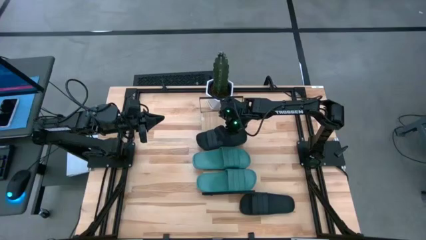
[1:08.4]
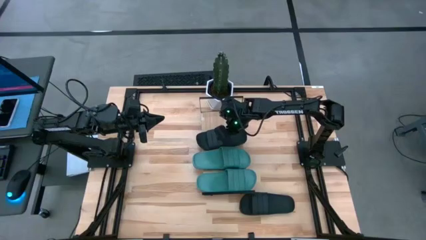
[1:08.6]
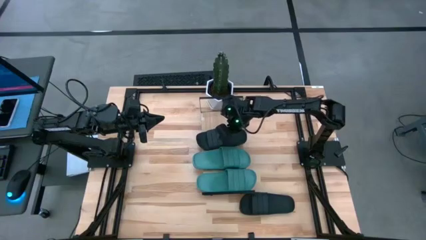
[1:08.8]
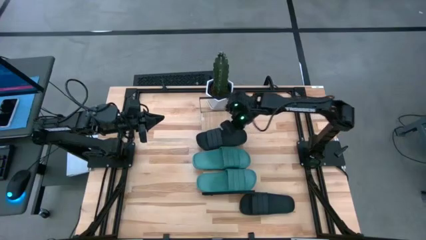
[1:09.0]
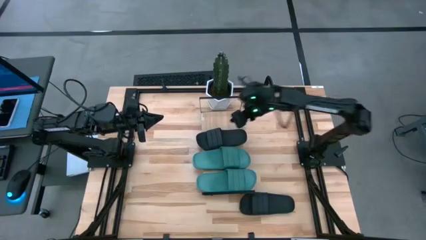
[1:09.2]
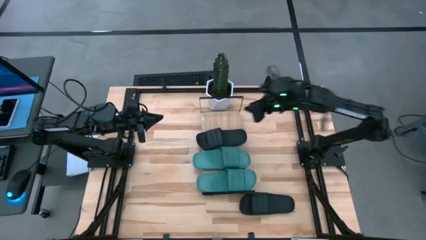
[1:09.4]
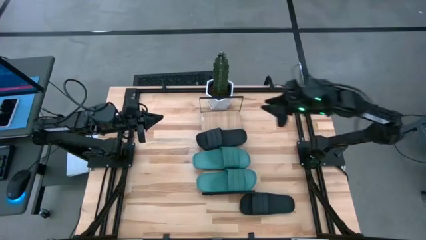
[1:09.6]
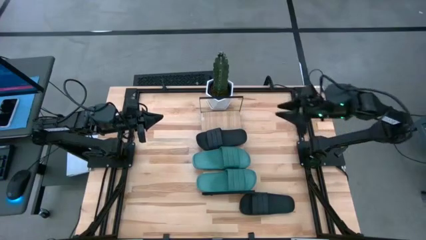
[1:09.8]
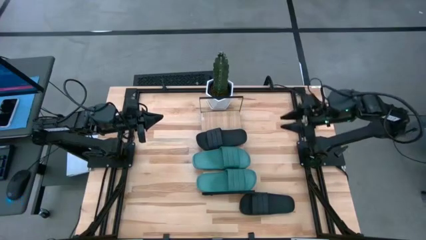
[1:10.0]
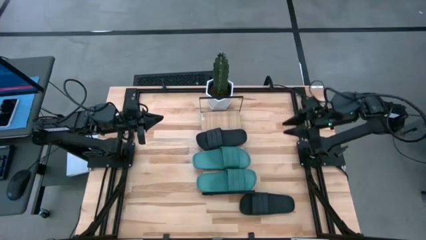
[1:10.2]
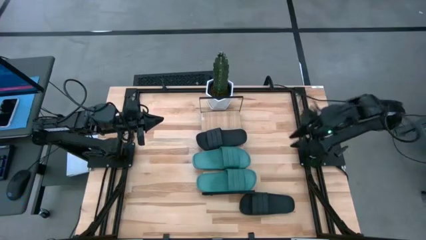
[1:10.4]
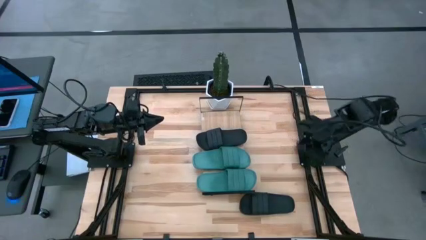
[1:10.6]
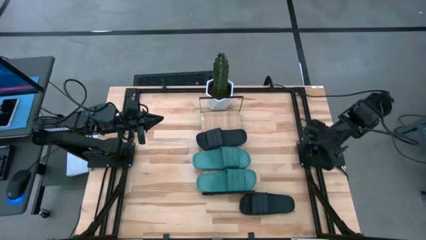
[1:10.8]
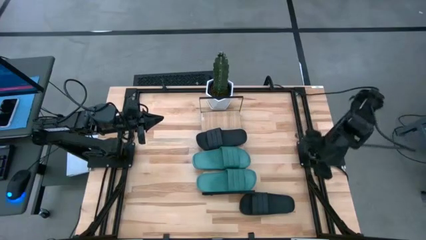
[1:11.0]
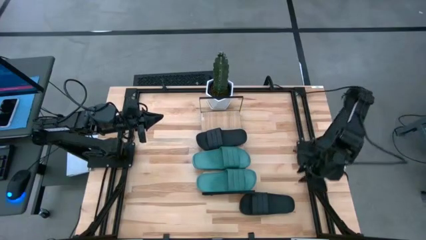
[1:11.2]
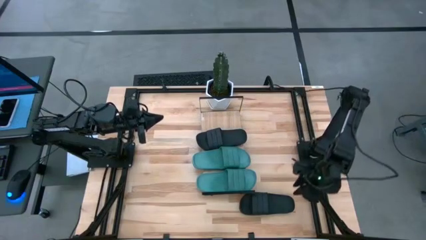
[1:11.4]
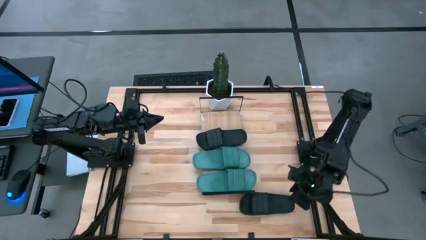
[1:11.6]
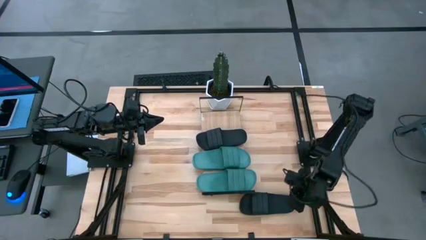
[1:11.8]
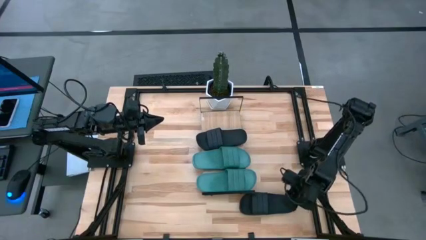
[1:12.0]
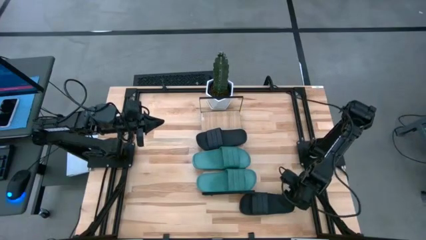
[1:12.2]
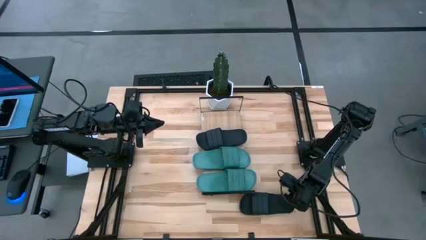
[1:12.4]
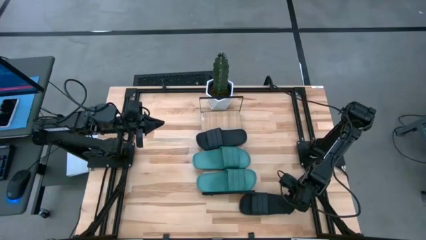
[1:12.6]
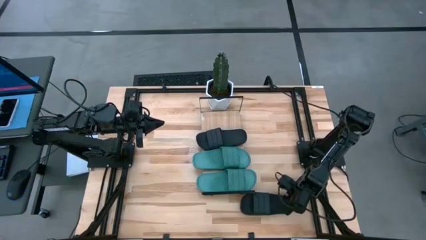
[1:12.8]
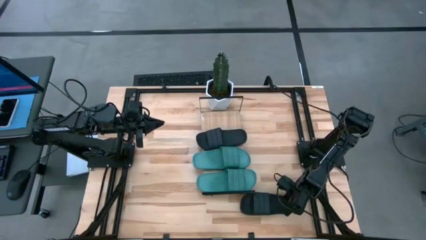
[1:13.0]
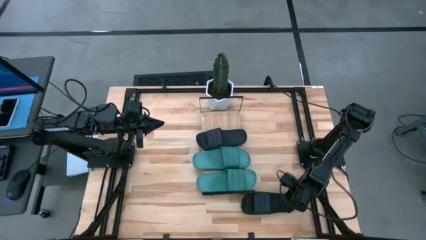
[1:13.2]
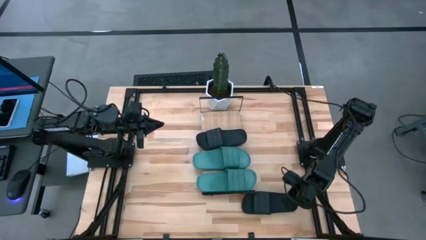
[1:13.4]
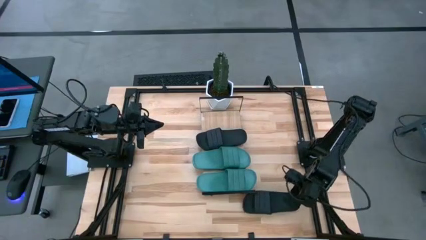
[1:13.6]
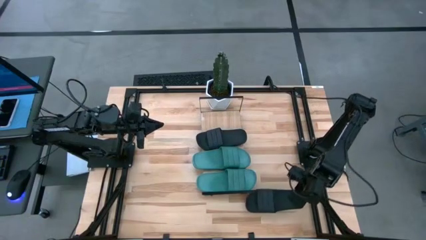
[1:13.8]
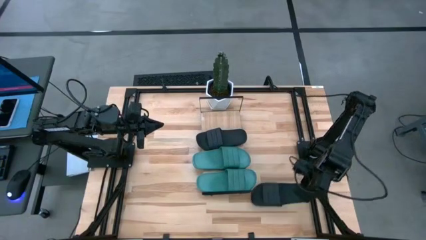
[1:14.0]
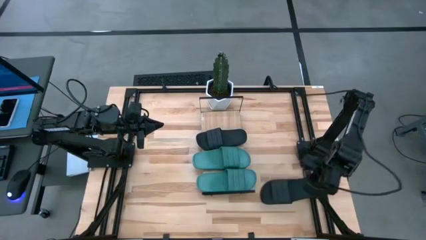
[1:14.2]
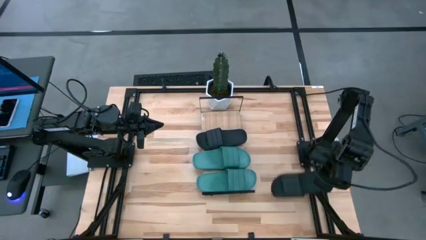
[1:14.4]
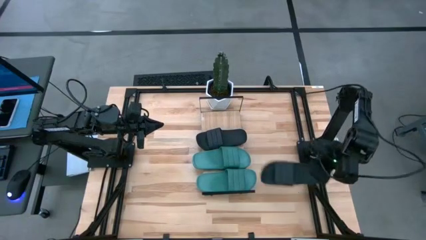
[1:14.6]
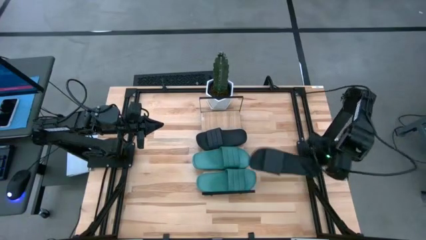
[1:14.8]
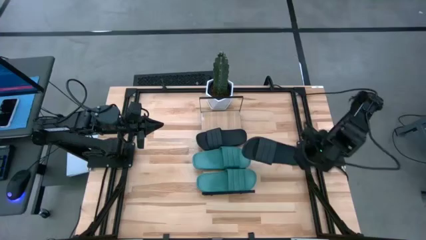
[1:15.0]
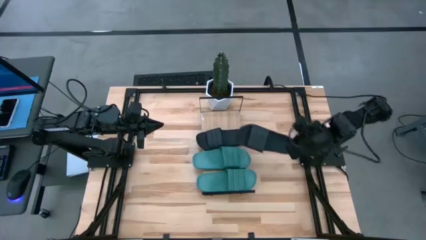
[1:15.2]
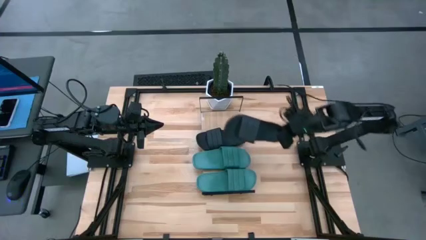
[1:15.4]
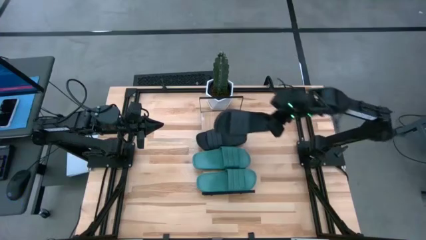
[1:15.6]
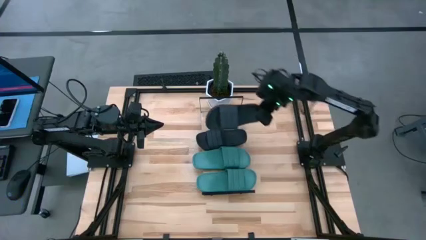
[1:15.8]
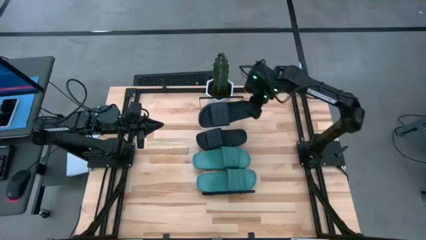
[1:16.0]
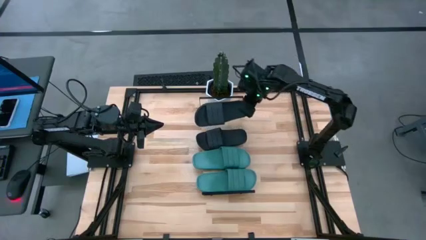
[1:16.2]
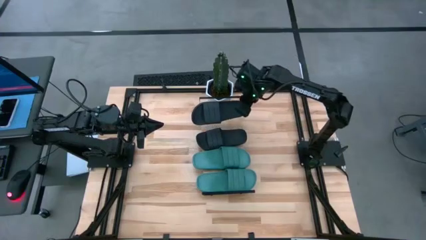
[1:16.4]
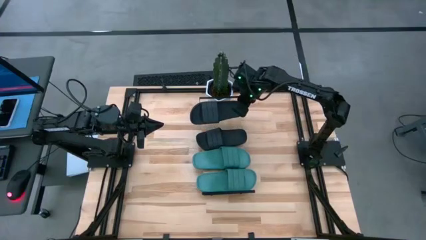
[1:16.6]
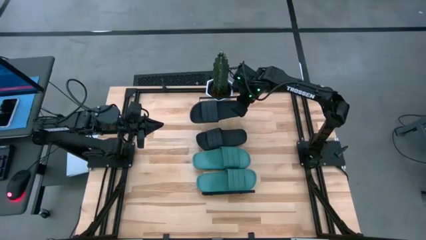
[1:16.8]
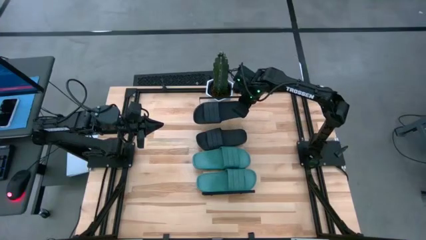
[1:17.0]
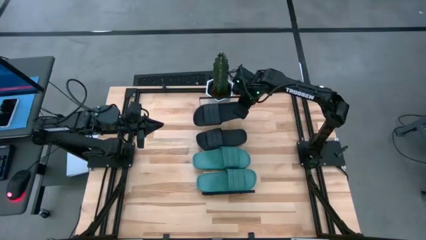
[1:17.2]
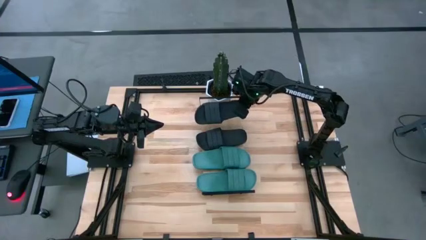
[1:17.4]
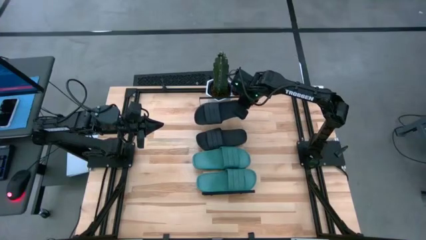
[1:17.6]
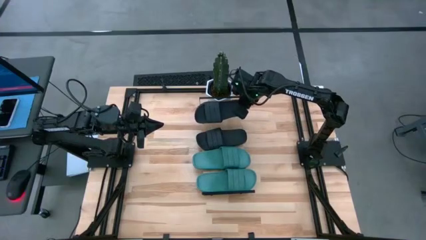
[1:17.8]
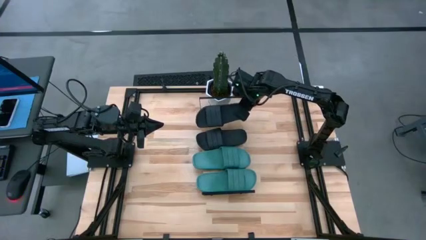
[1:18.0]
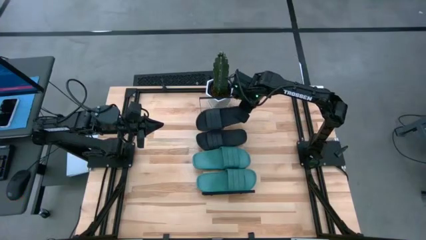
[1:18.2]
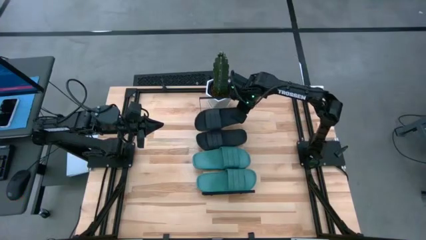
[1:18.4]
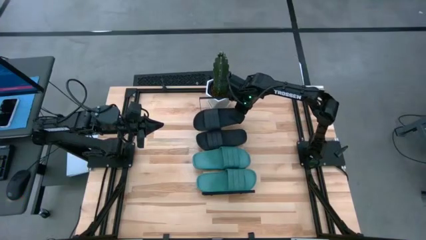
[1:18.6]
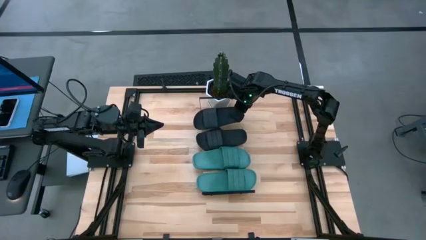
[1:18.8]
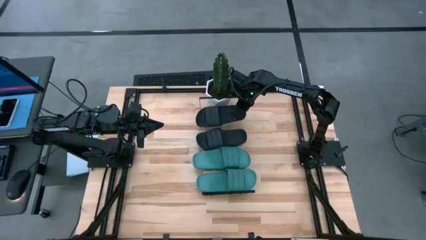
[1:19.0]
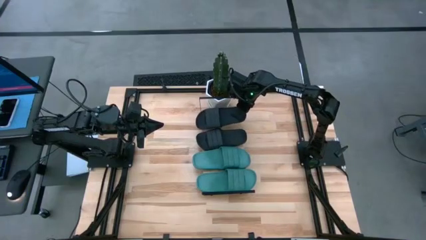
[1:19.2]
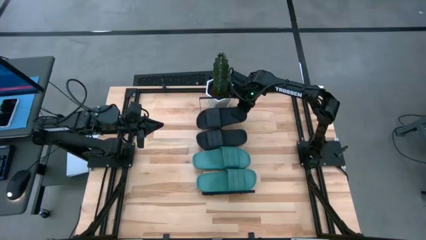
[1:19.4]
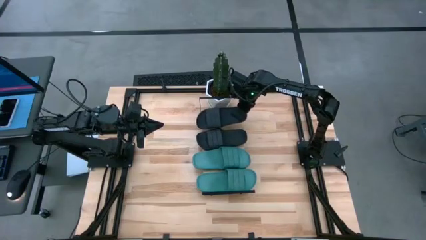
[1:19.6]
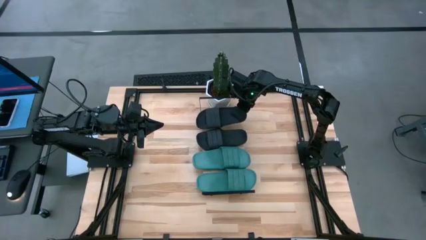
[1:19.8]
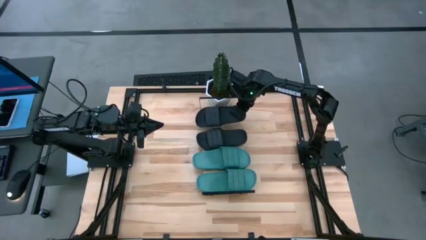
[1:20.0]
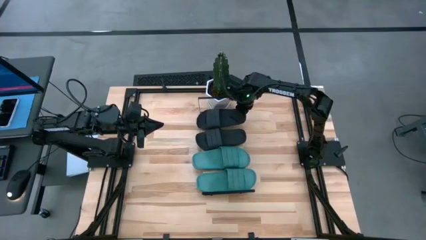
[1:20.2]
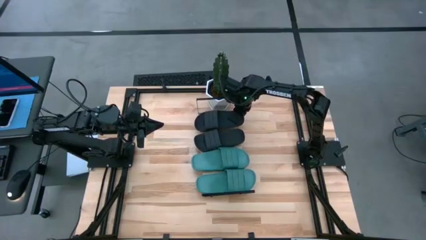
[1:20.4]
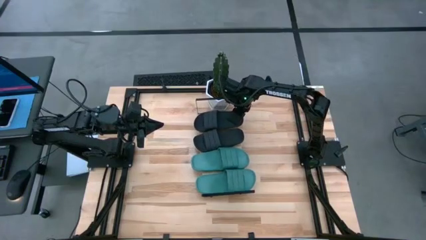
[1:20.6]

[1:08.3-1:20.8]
Task: Pick and place slides into the shelf
Put the black slipper on the shelf

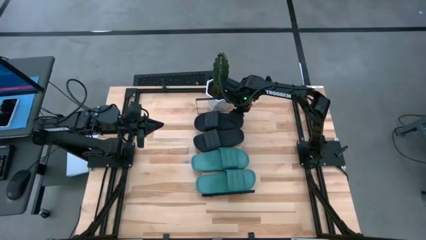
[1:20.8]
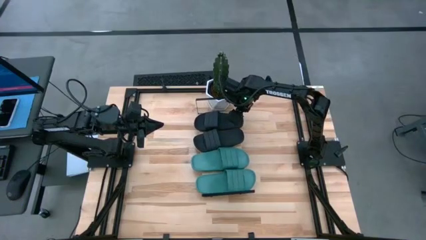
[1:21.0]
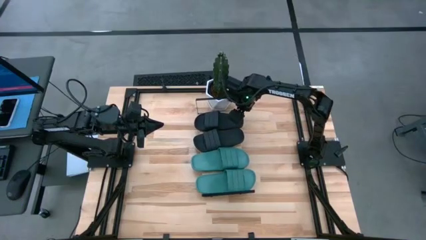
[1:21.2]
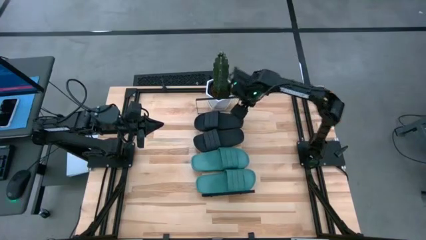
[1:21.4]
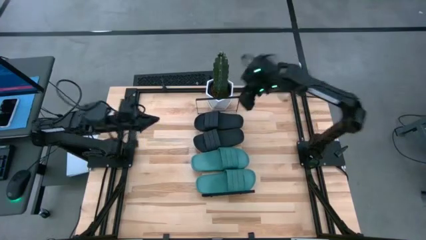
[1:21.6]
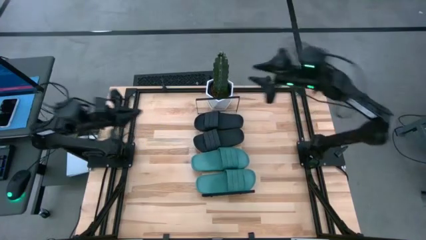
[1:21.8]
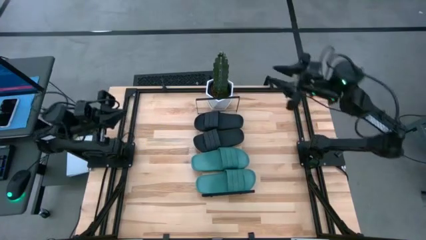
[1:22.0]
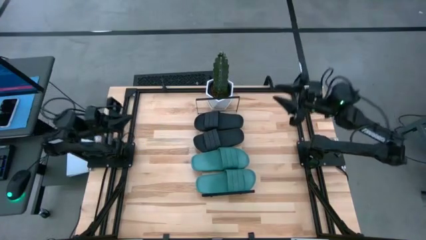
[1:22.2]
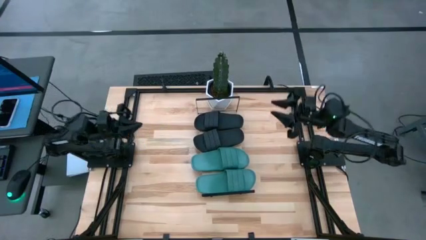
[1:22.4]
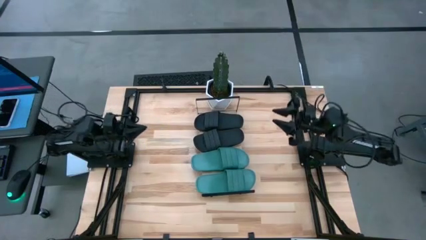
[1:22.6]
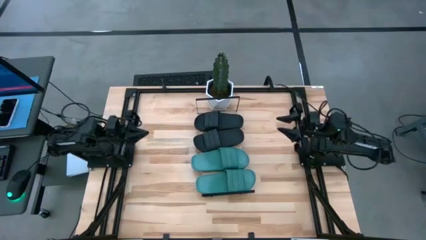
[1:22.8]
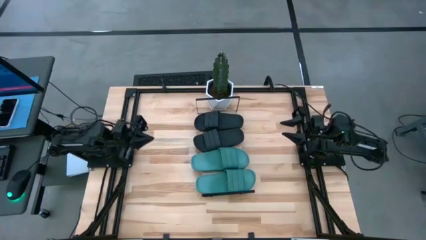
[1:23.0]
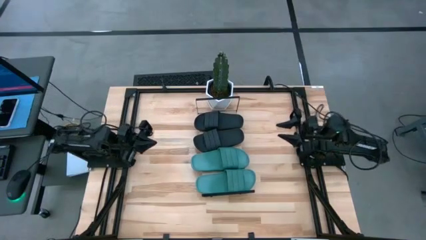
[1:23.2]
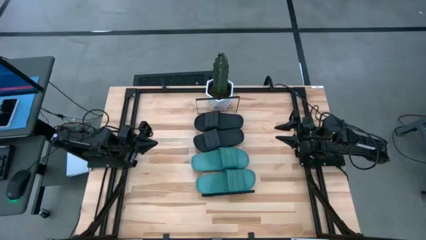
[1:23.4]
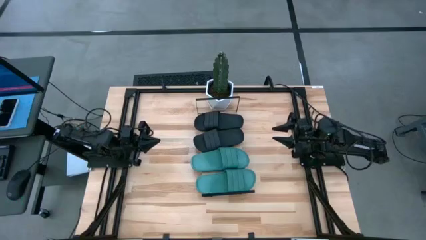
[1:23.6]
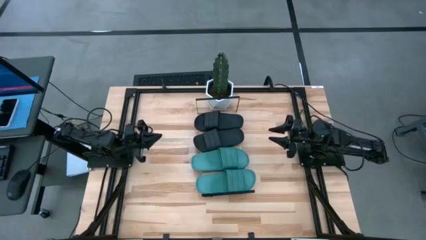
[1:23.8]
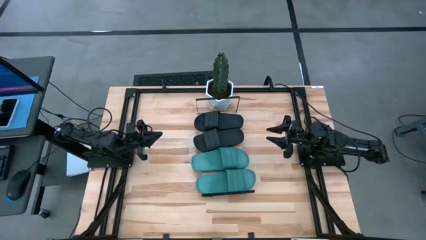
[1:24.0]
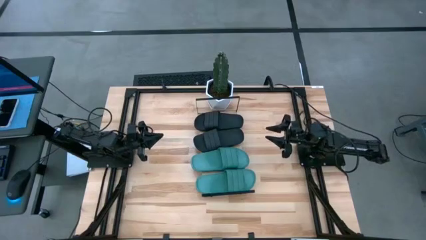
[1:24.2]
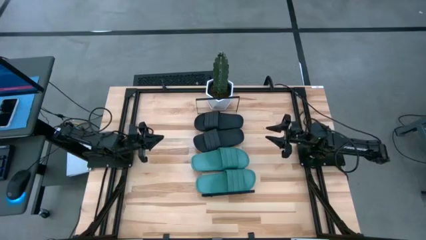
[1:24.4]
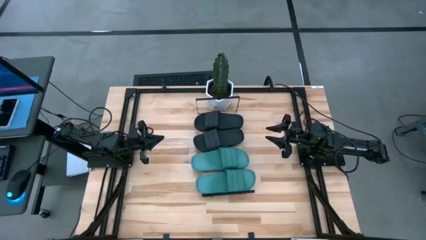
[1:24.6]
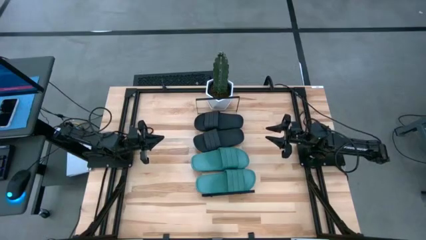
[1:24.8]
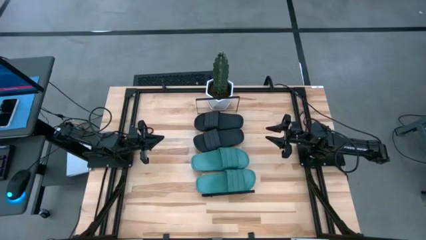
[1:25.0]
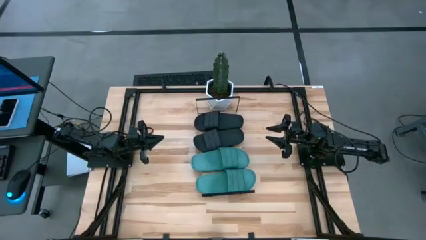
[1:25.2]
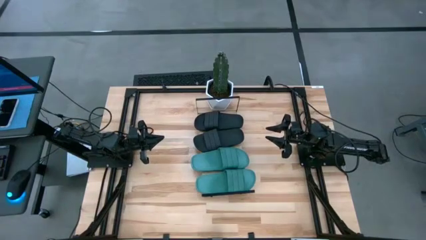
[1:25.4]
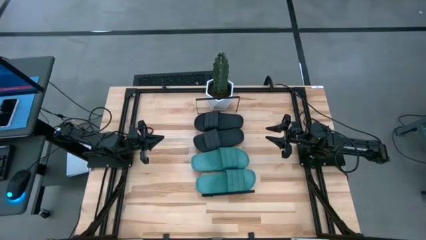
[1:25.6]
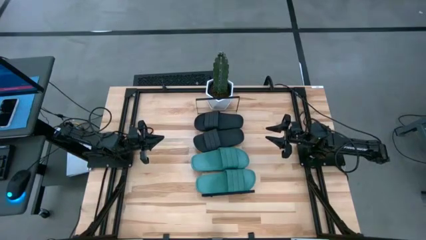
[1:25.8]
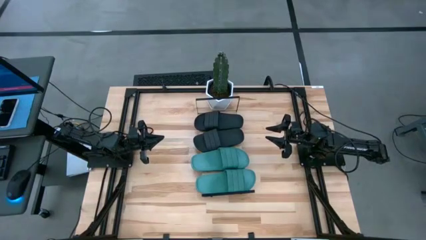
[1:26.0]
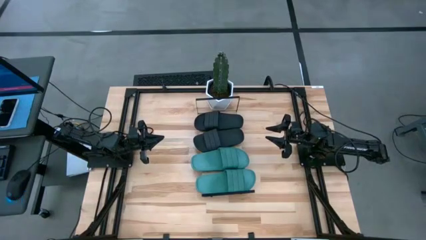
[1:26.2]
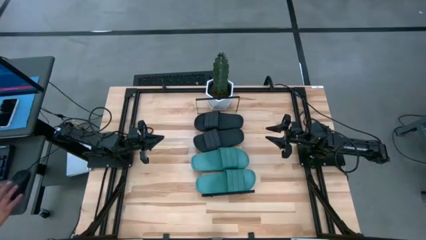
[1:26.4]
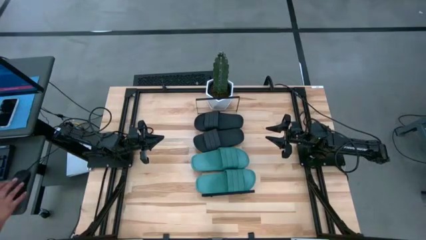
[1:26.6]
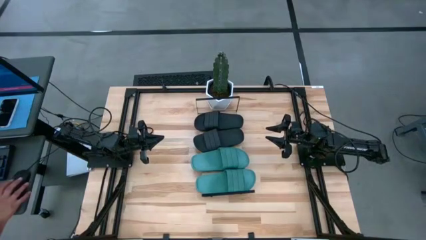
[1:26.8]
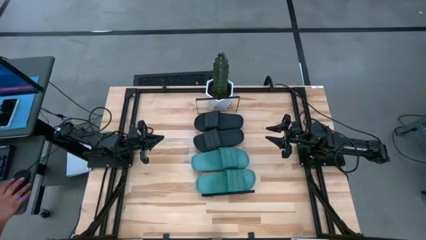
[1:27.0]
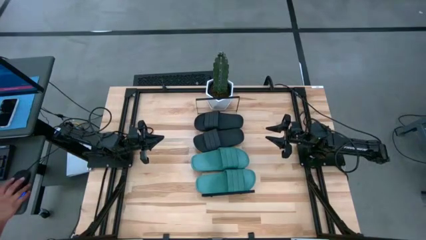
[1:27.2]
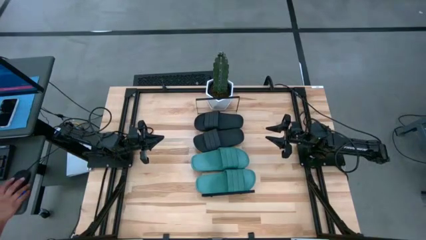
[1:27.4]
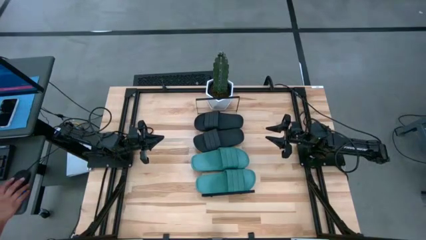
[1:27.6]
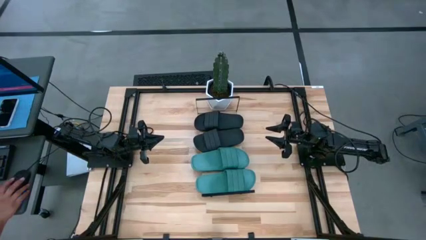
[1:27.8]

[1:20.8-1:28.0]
Return to Home Position
